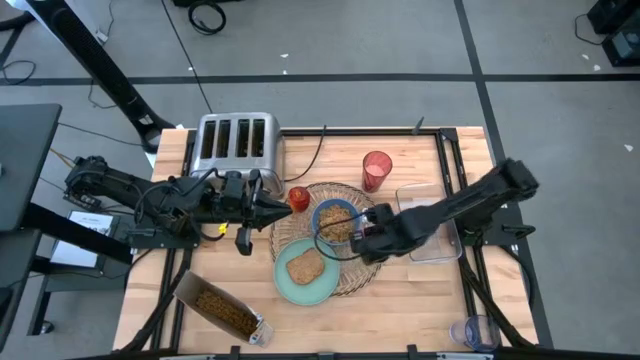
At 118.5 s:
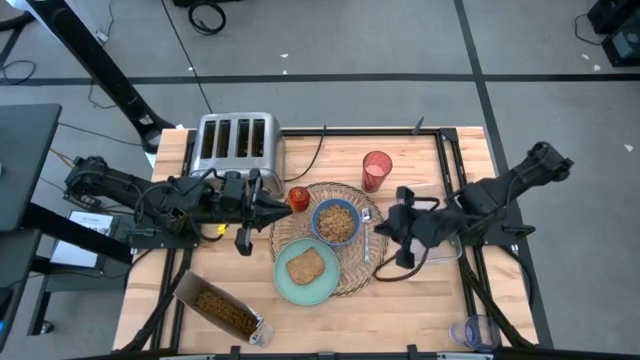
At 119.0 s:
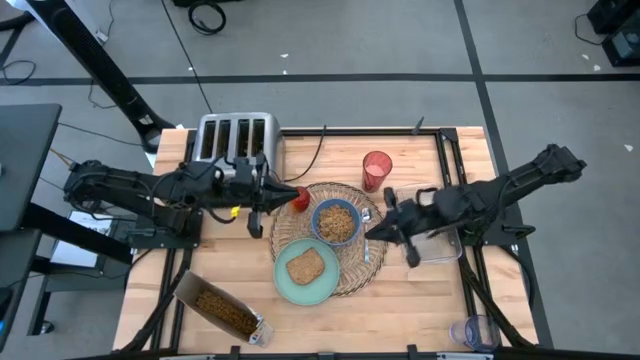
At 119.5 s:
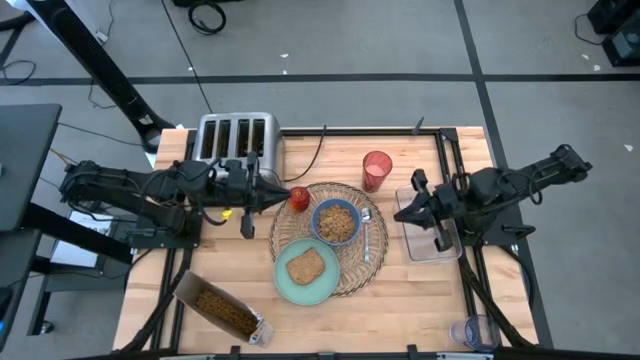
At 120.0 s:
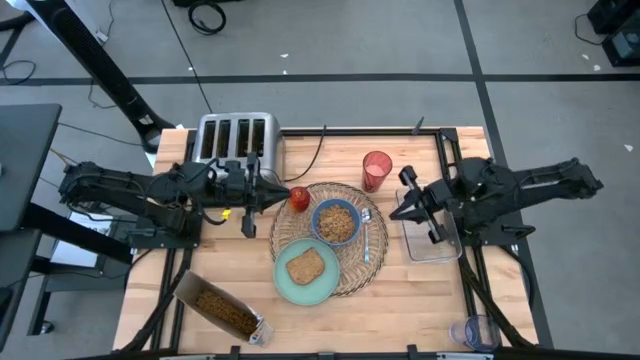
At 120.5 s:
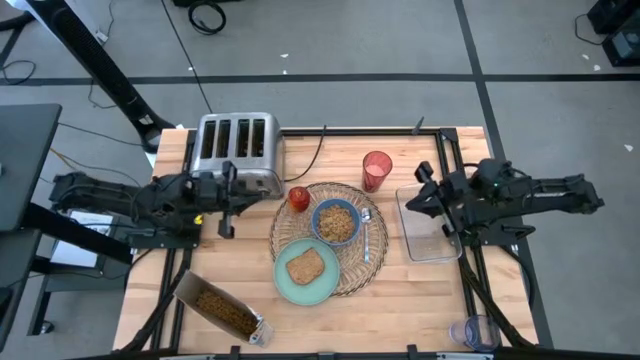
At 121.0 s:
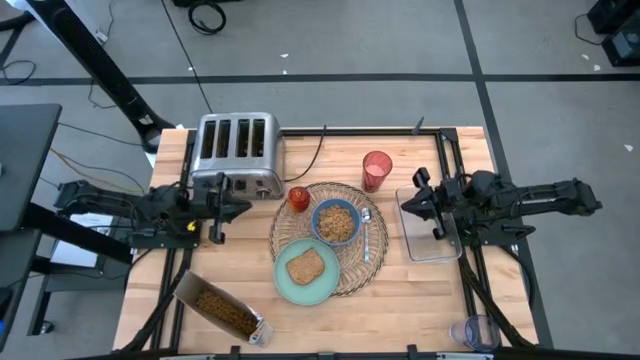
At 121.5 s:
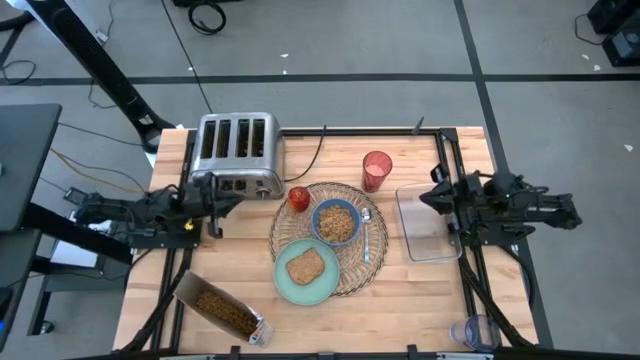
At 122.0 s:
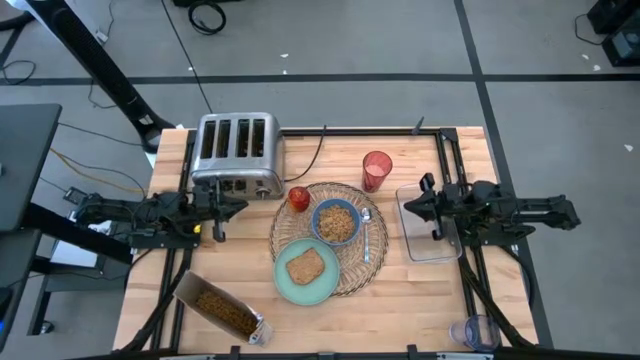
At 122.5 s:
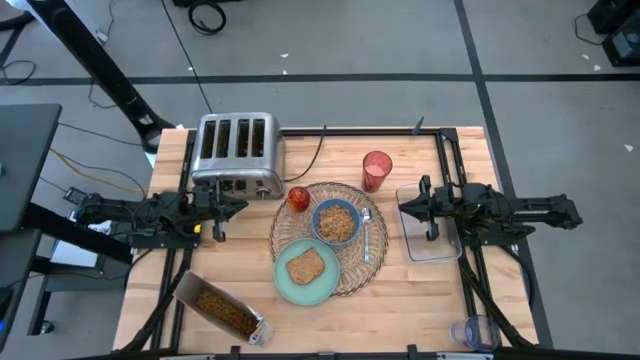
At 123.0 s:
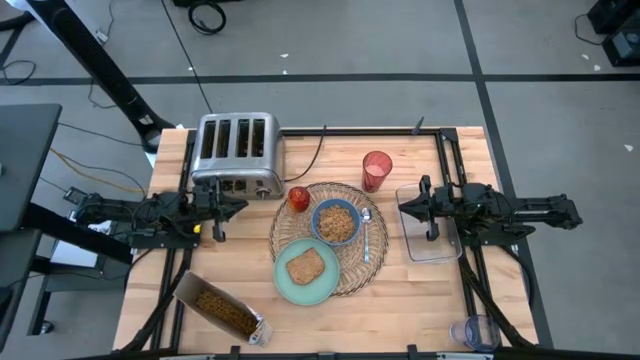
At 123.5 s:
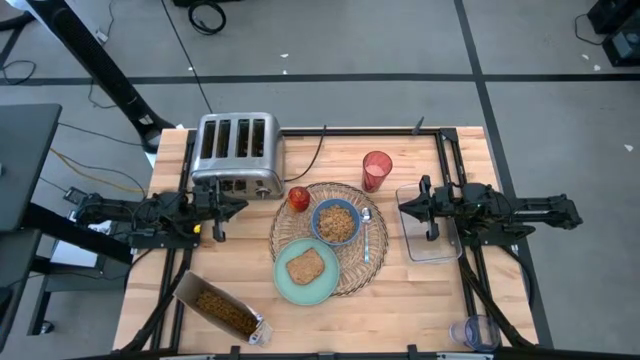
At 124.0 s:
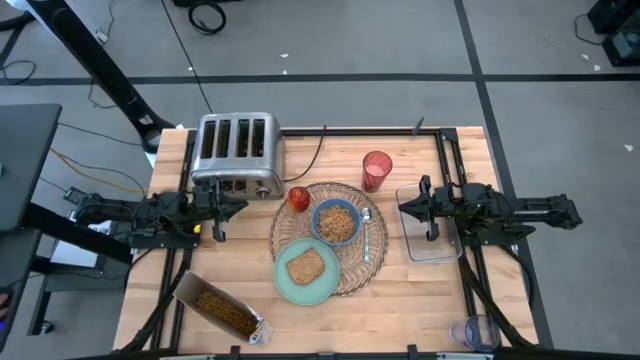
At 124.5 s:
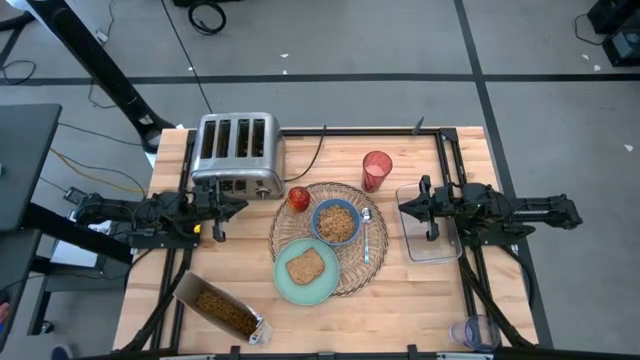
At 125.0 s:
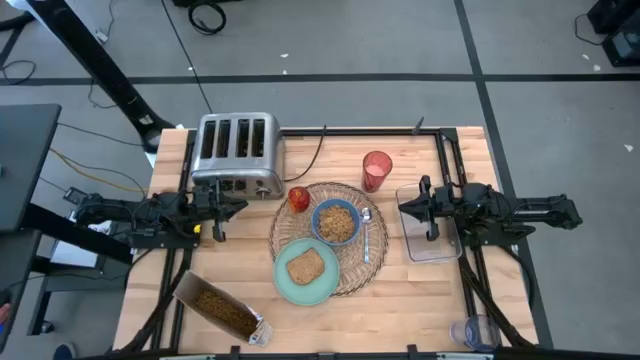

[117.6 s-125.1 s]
Task: Arrange a breakfast setting
Return to Home Position

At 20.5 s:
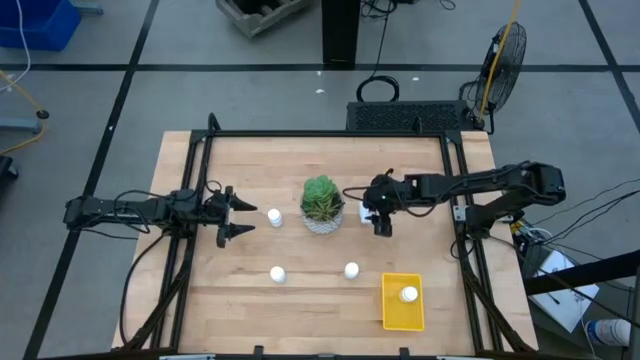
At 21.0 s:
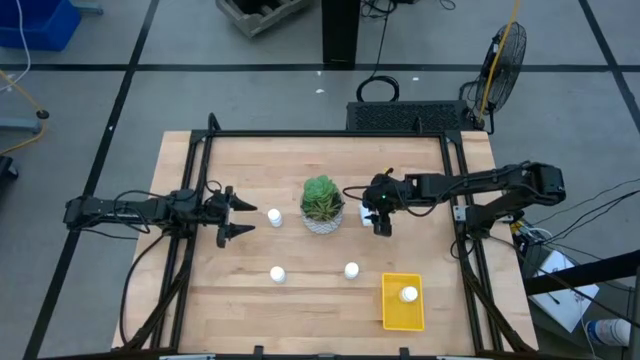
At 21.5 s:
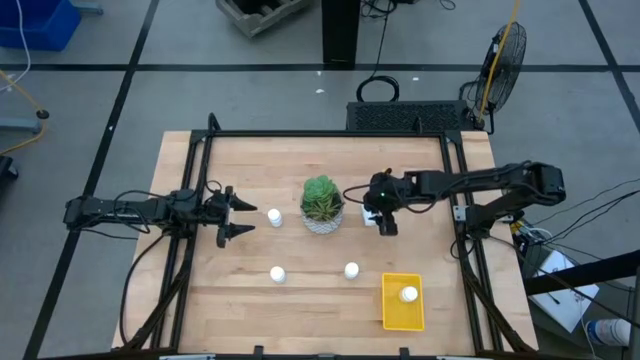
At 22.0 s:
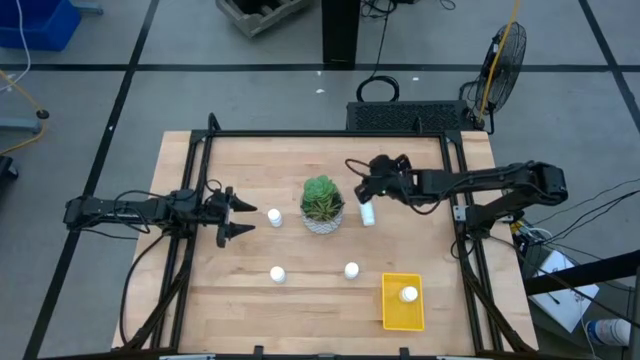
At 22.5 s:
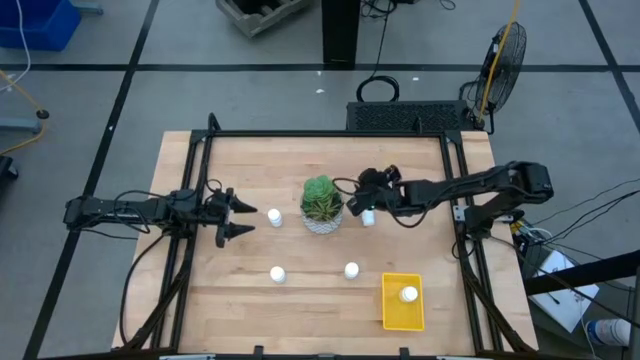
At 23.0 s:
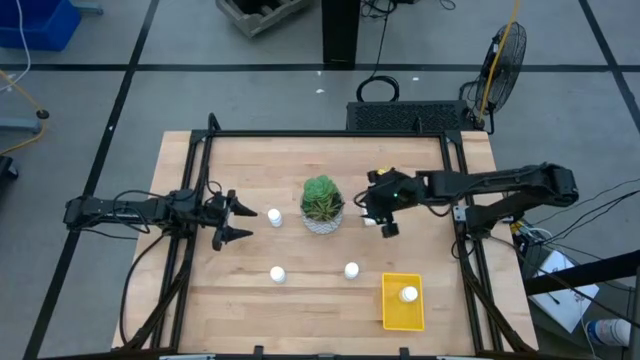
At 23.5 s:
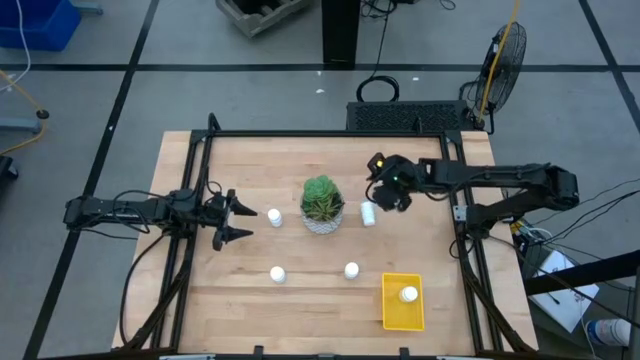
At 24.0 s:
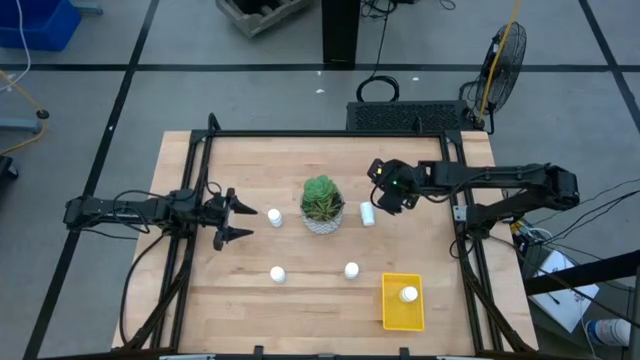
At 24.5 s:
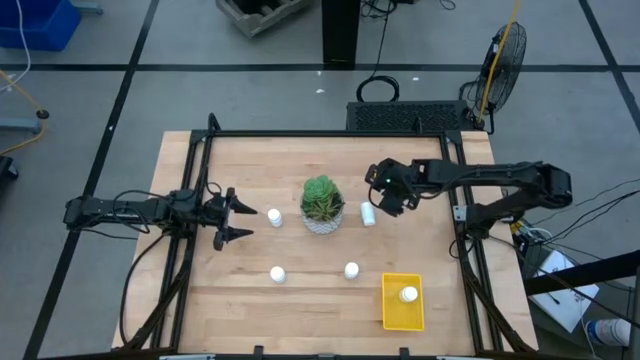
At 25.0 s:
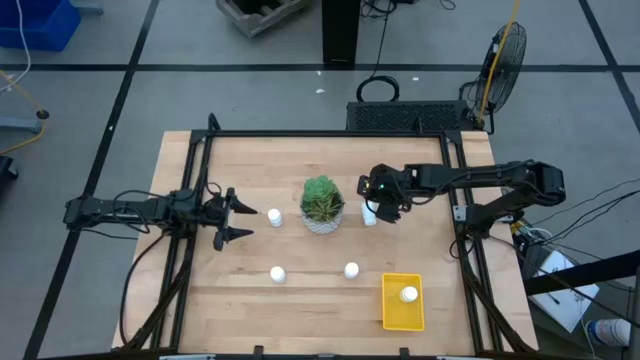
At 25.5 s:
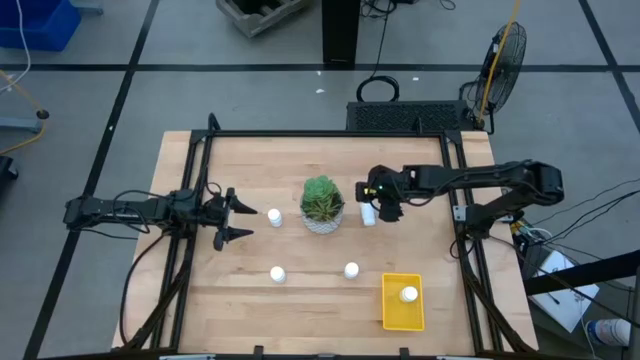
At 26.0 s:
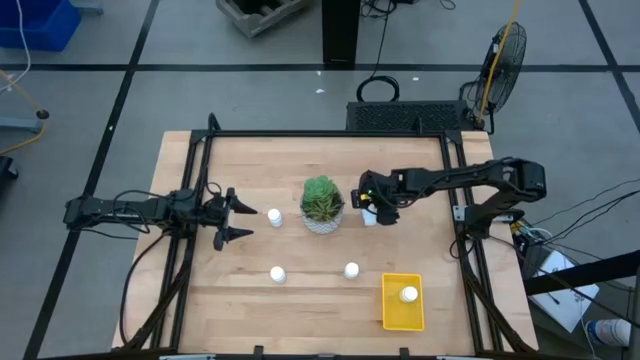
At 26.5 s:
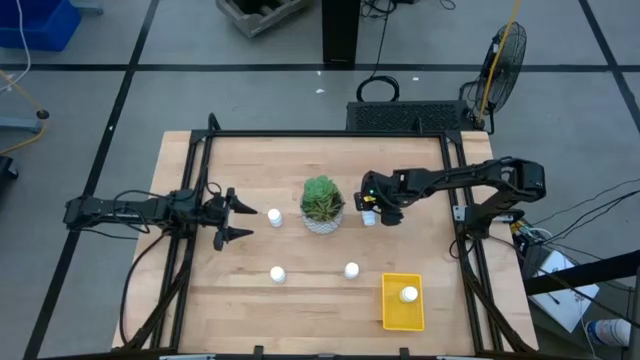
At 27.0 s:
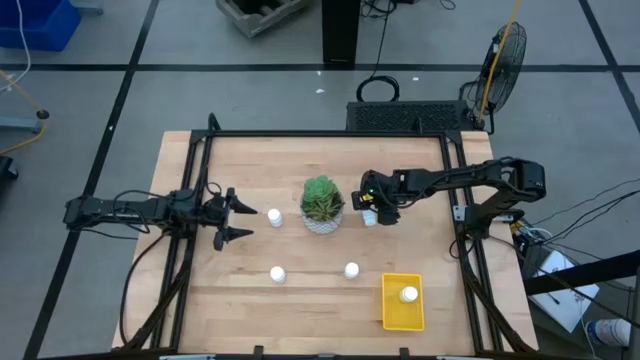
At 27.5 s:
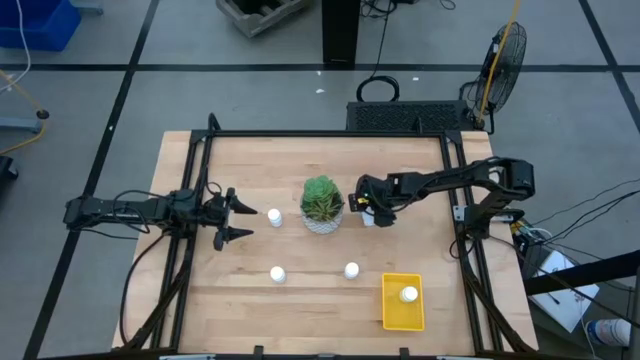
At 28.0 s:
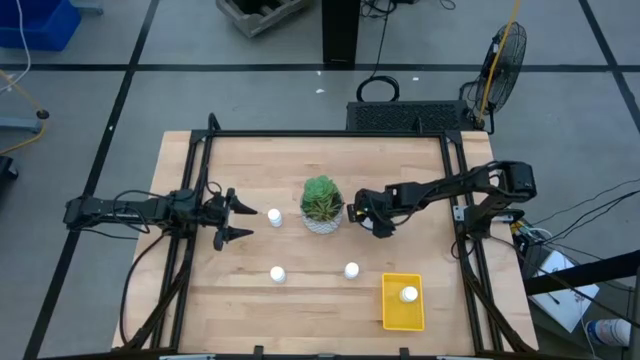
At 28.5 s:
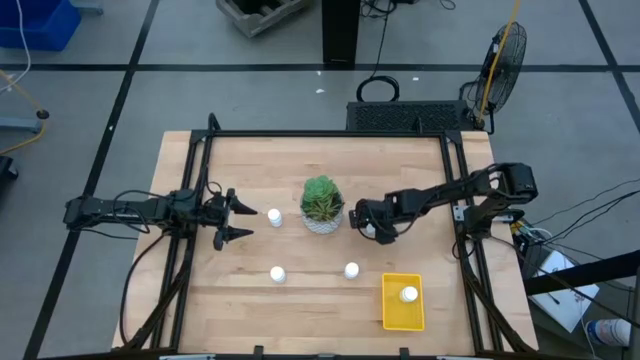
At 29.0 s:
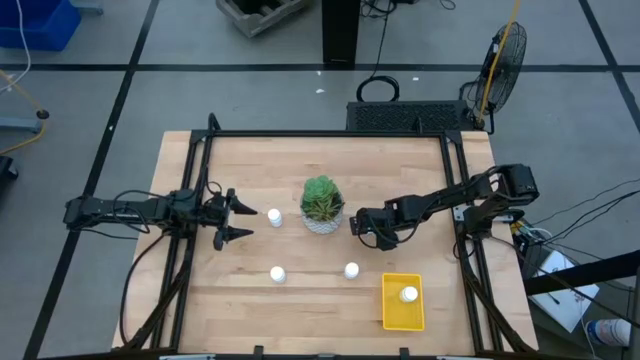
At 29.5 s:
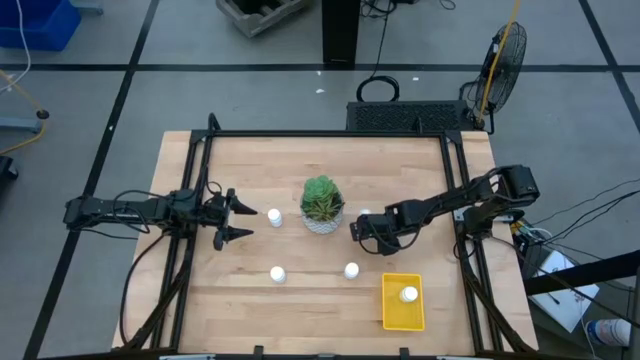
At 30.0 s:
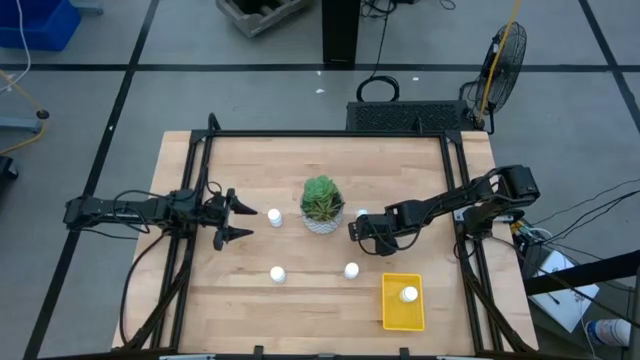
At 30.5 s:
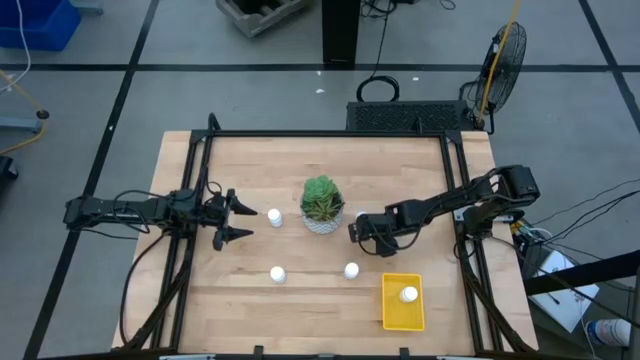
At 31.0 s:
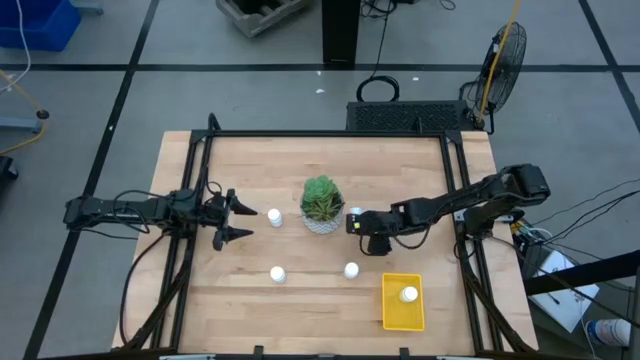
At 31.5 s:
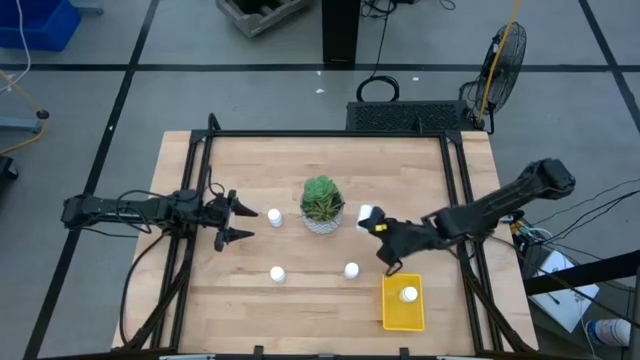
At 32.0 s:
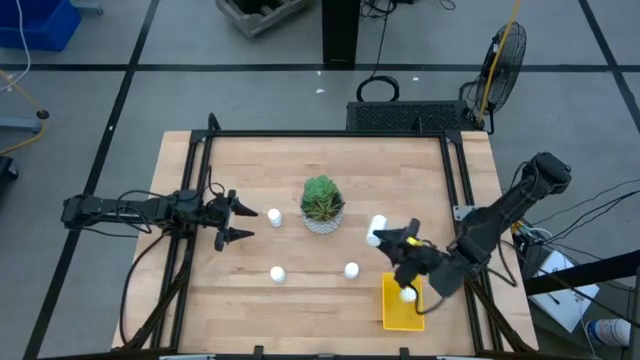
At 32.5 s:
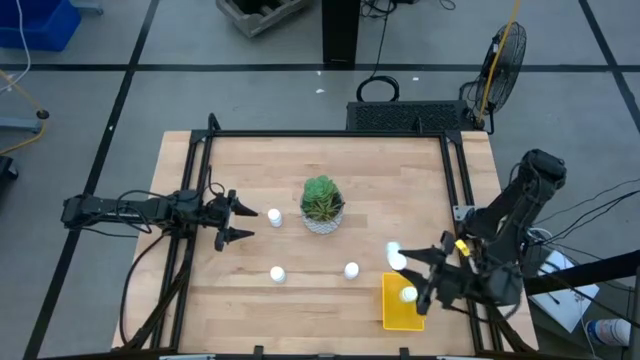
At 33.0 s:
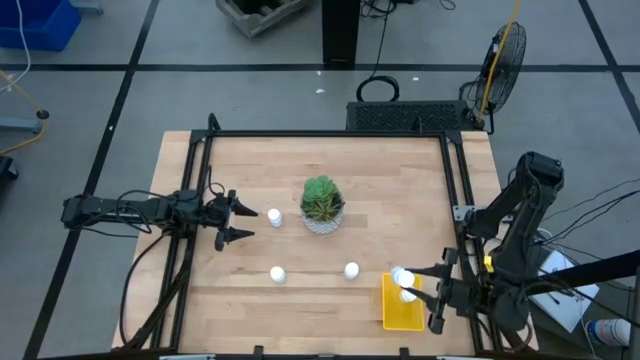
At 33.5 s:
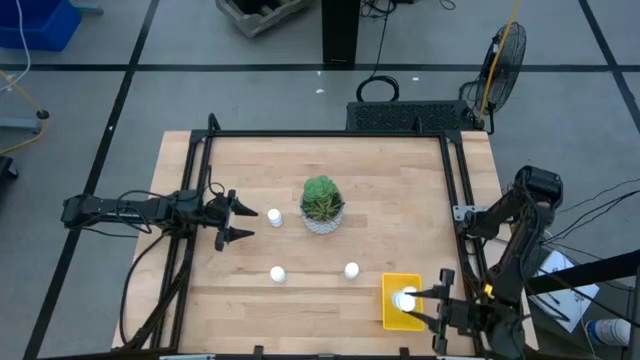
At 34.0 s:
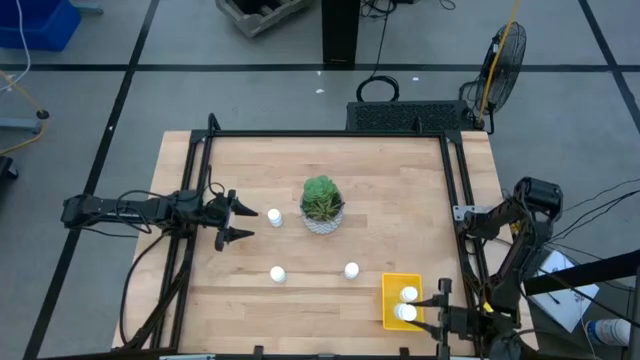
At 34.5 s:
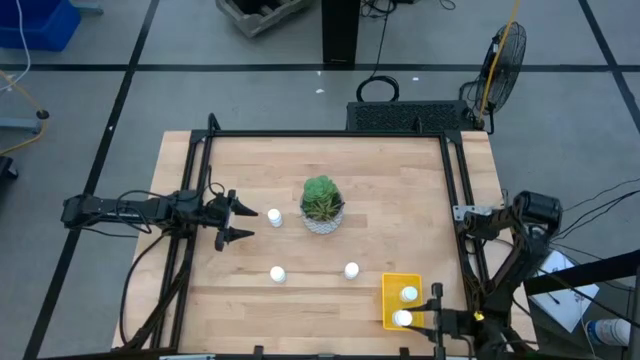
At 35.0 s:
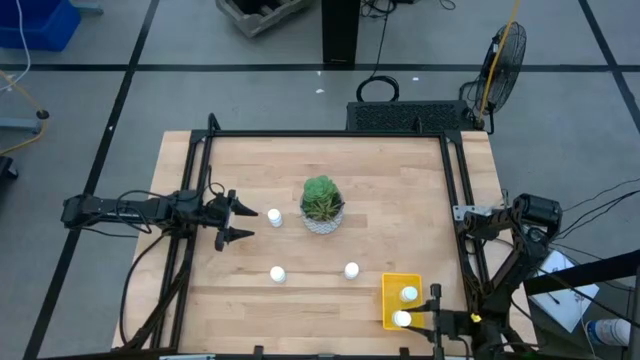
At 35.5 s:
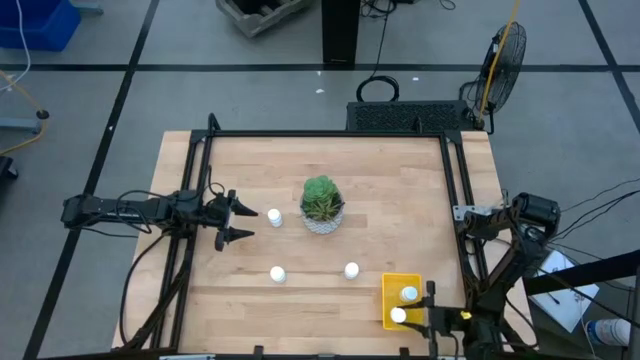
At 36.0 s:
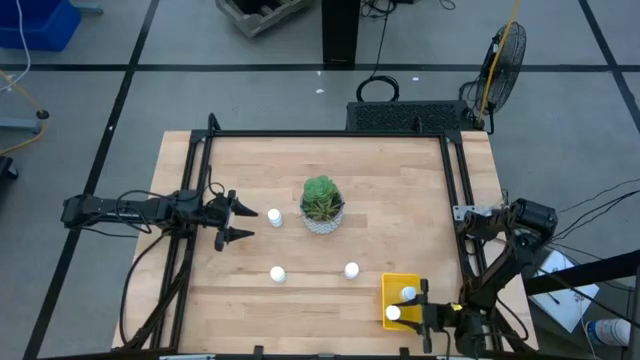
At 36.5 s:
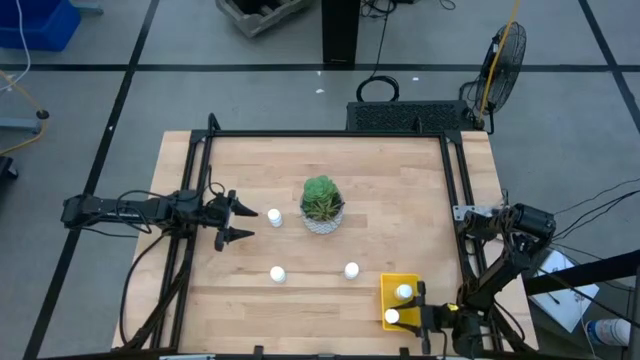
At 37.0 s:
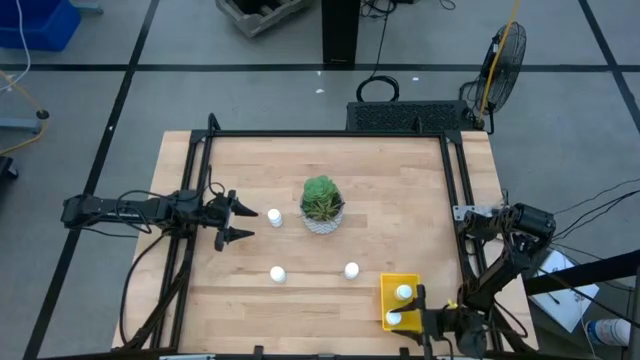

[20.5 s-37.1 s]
Task: Pick and place pill bottles into a basket
Put the white pill bottle into the bin
